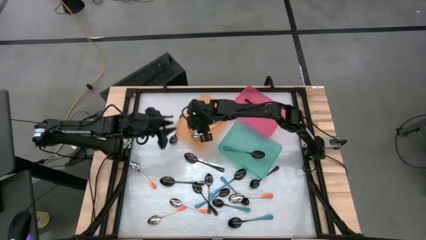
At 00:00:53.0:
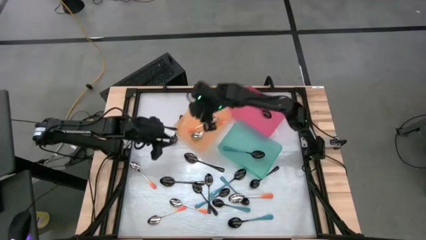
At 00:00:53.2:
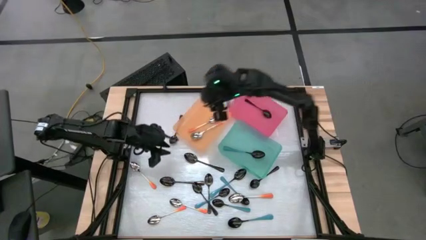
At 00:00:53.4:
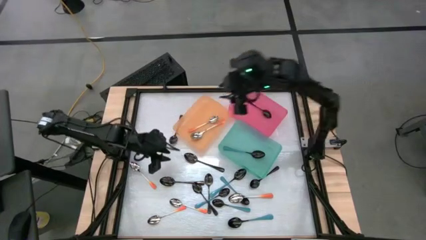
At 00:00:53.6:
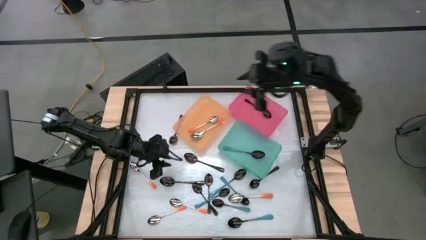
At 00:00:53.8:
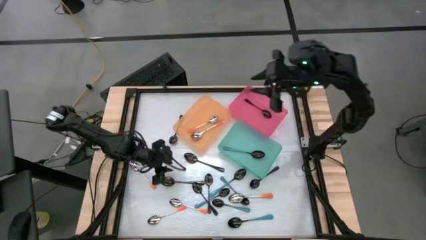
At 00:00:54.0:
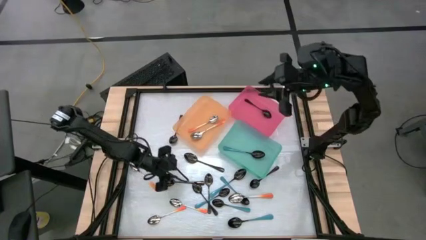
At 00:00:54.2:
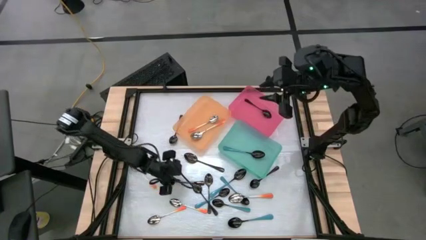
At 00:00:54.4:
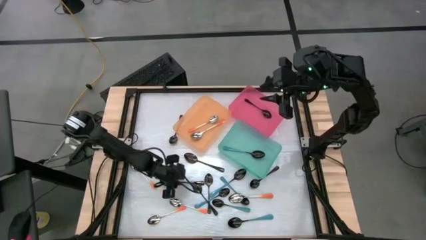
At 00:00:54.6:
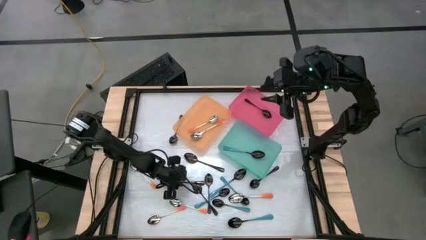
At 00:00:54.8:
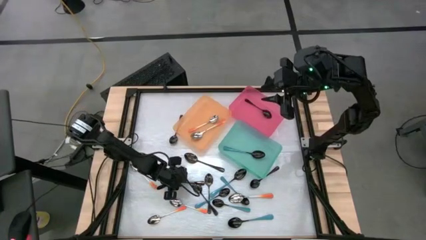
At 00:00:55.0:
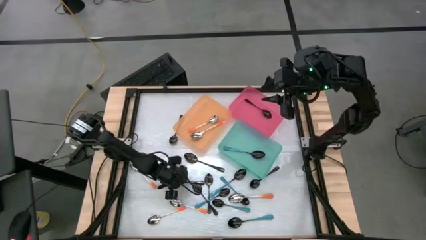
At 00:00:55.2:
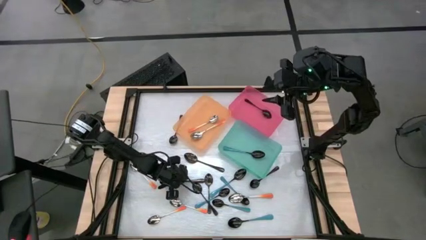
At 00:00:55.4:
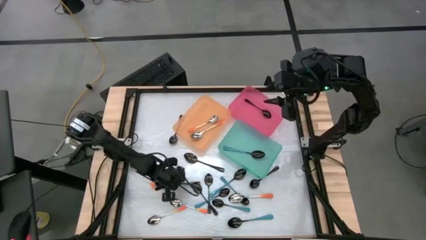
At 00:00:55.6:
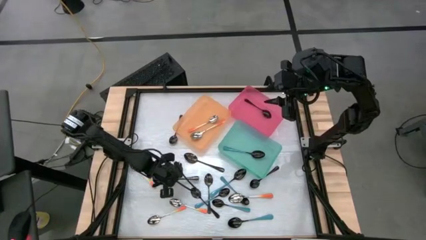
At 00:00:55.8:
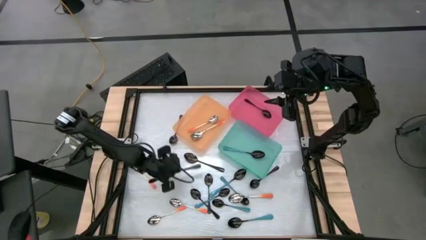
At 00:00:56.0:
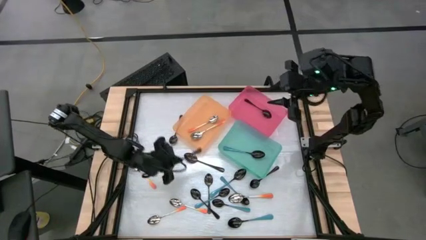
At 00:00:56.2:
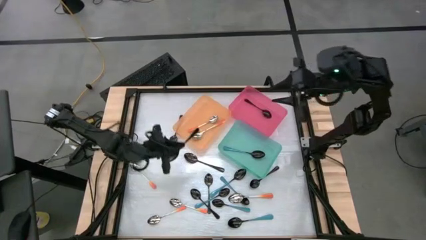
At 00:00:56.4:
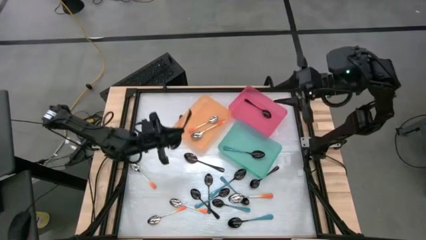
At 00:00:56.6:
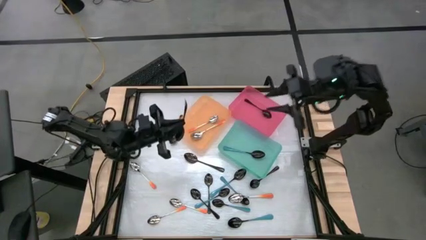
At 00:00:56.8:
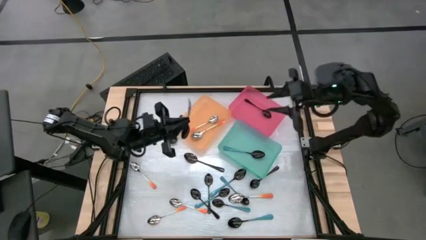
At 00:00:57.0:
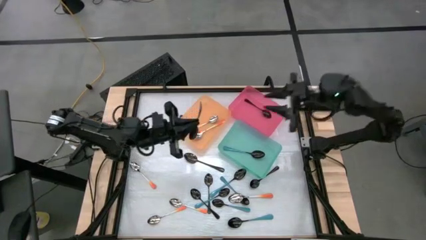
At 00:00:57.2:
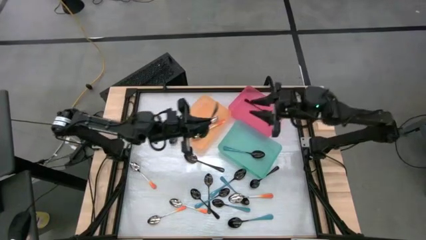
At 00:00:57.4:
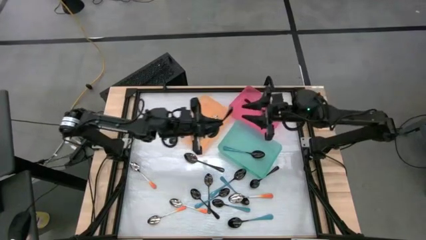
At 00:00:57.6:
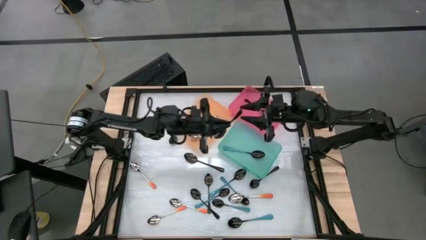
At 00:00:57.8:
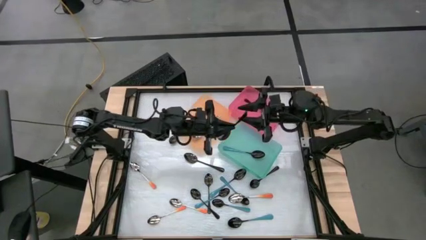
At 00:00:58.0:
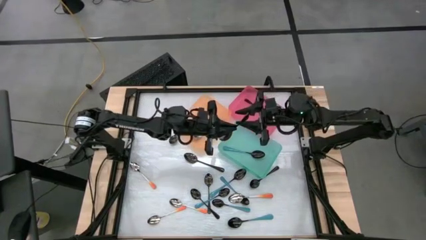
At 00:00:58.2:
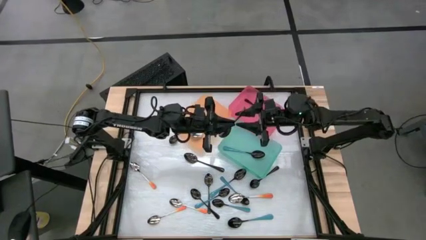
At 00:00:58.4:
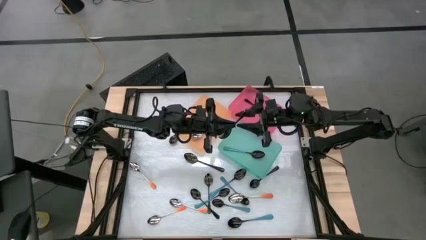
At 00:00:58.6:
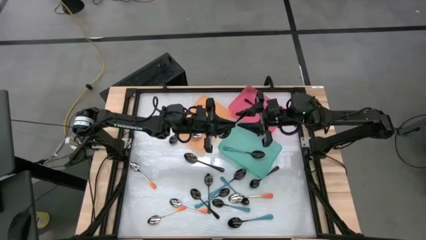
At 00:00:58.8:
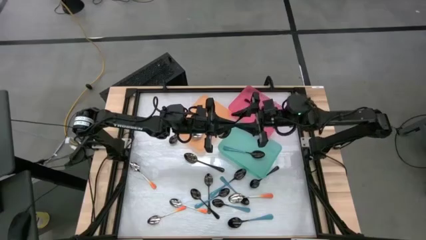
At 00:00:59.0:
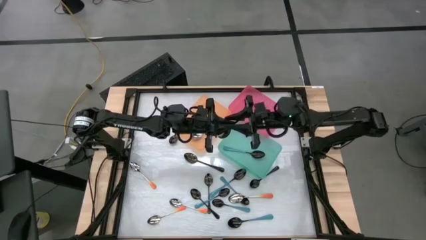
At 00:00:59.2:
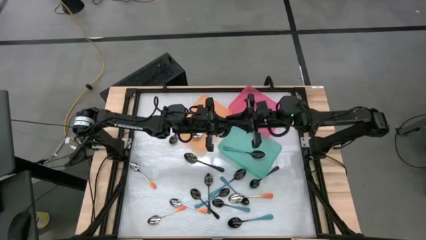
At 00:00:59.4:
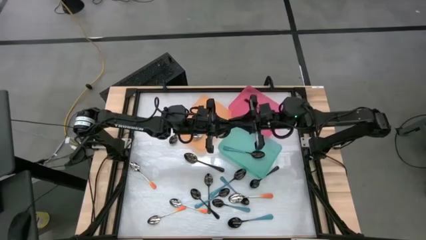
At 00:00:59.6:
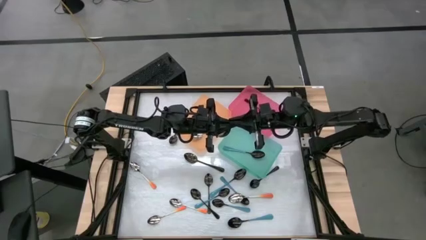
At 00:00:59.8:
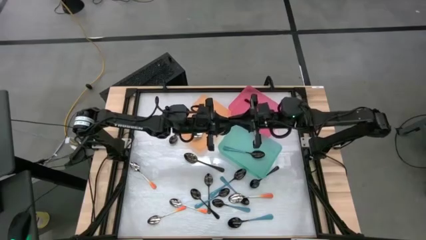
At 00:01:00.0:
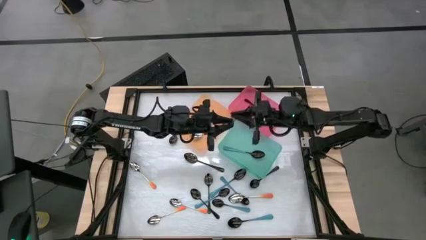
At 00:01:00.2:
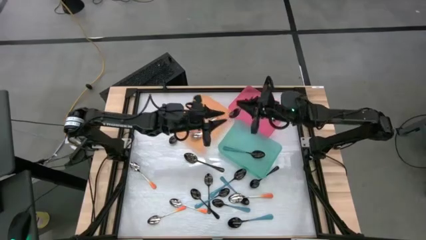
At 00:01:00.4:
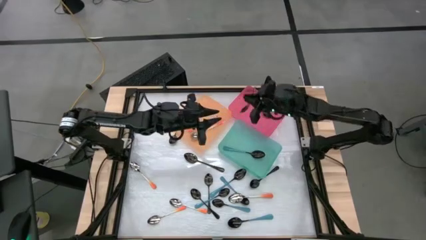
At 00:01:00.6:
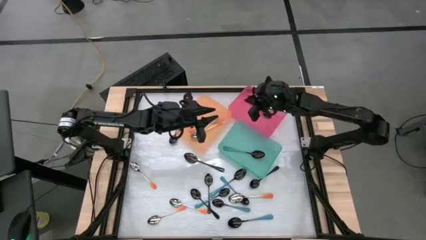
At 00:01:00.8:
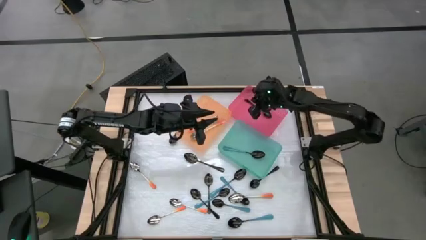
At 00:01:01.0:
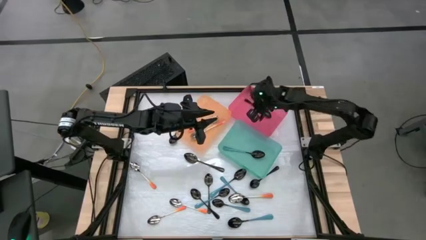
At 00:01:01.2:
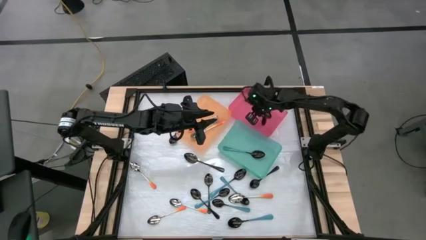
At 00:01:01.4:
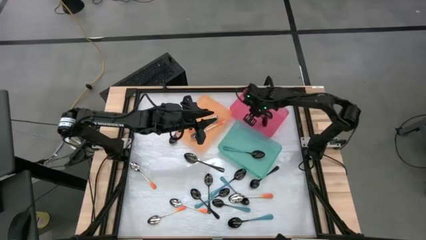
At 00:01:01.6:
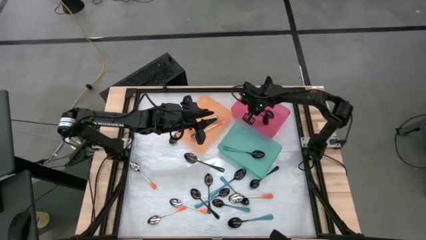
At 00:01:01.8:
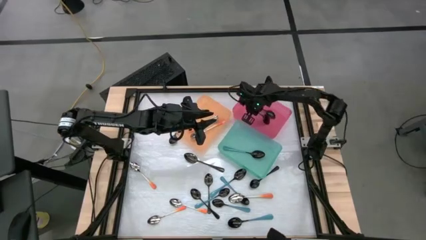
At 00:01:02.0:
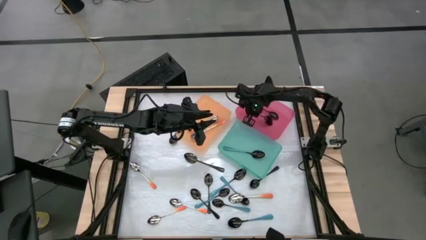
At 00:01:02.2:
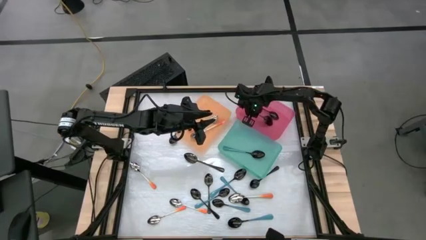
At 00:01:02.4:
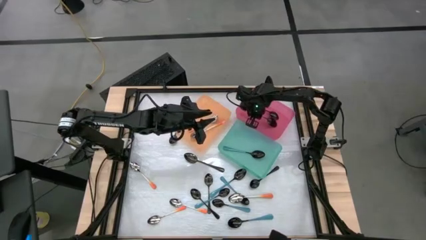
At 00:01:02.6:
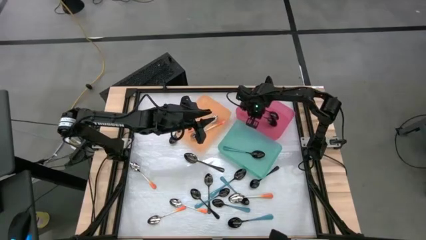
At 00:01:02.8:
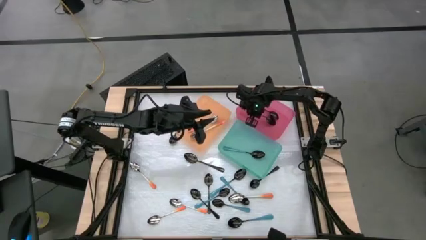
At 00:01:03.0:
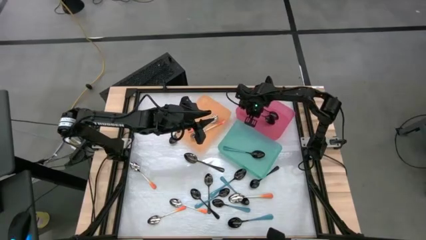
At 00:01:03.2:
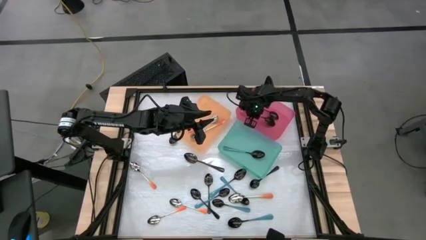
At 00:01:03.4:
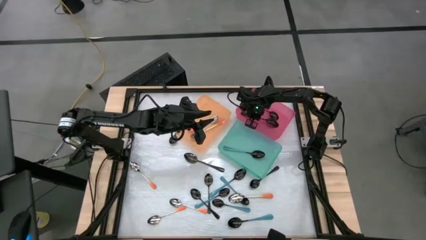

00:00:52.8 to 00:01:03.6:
Task: Sort silverware by color (type)
Put the black spoon into the pink bin
